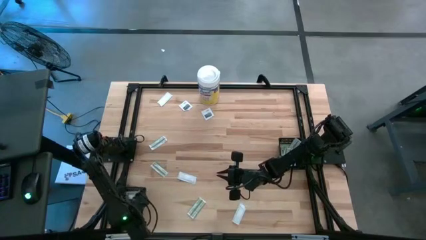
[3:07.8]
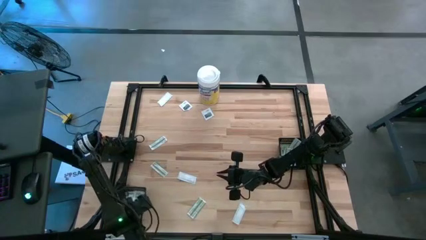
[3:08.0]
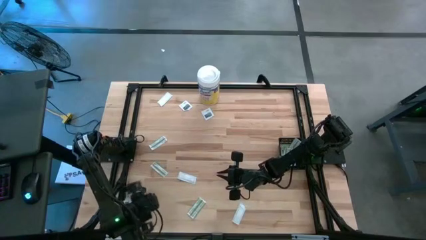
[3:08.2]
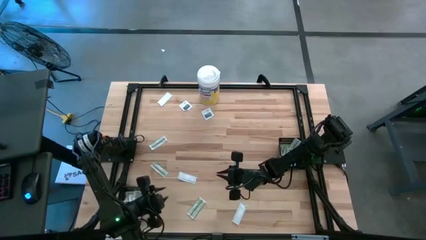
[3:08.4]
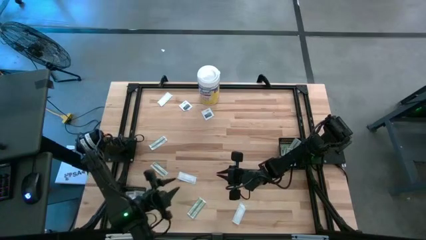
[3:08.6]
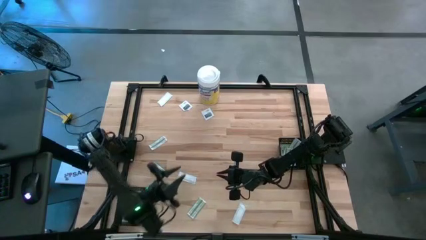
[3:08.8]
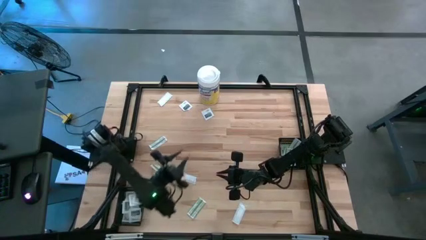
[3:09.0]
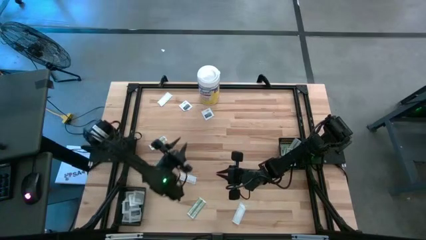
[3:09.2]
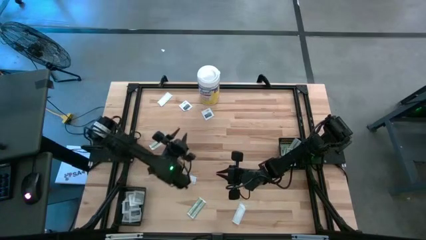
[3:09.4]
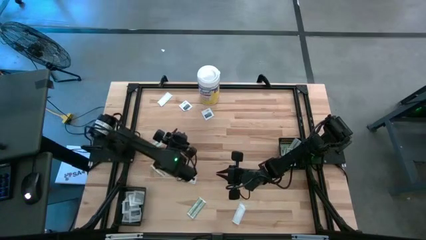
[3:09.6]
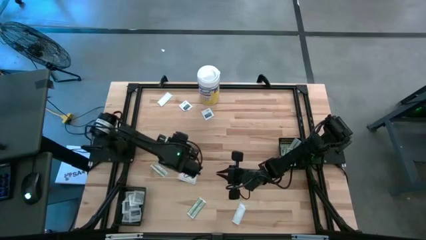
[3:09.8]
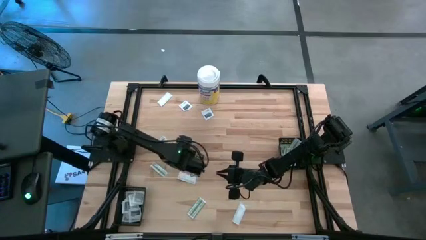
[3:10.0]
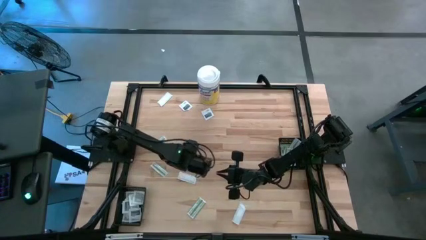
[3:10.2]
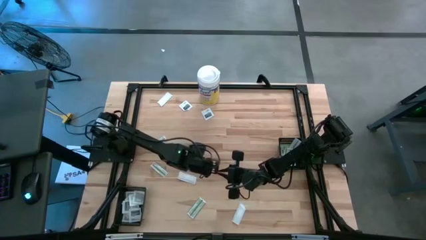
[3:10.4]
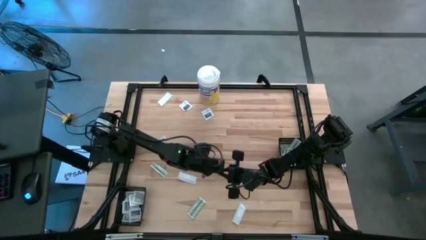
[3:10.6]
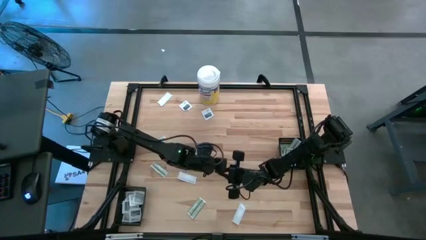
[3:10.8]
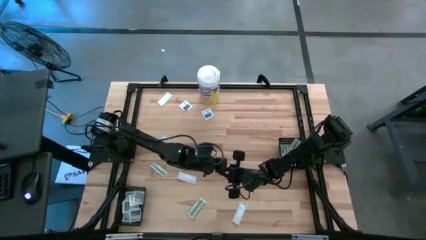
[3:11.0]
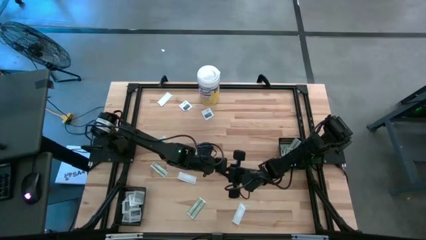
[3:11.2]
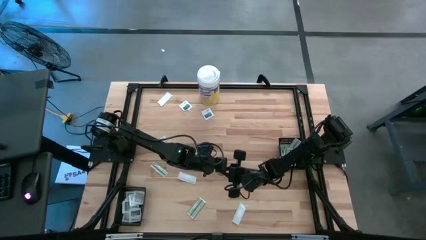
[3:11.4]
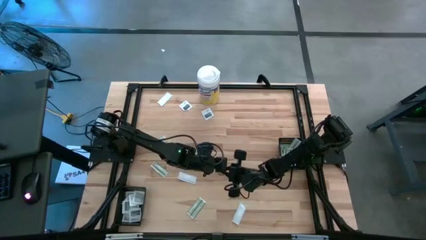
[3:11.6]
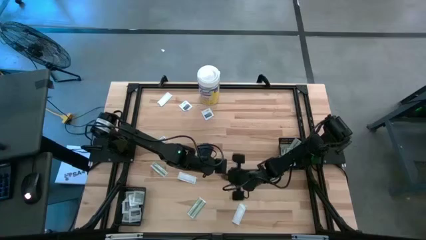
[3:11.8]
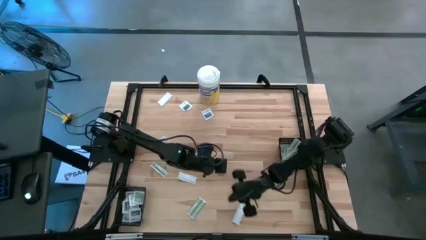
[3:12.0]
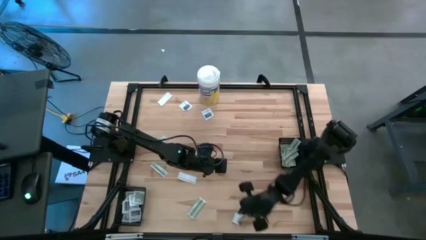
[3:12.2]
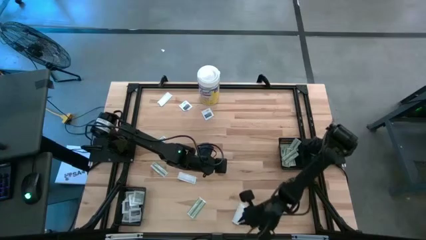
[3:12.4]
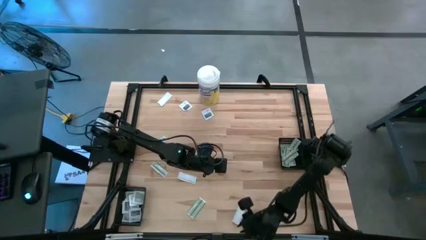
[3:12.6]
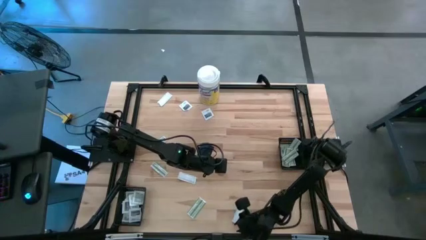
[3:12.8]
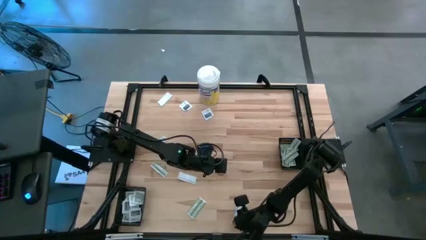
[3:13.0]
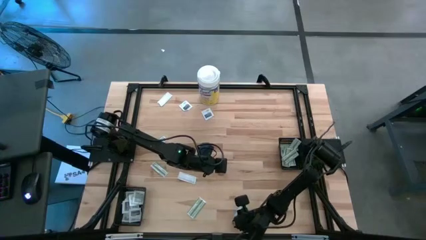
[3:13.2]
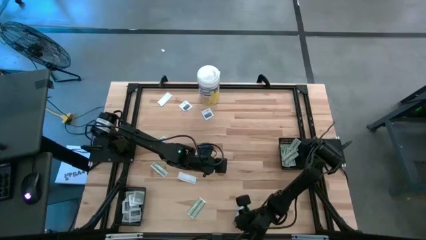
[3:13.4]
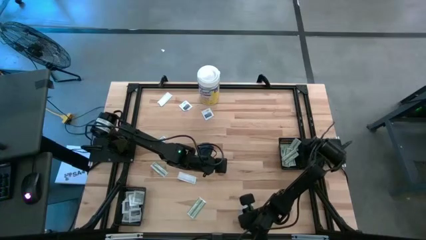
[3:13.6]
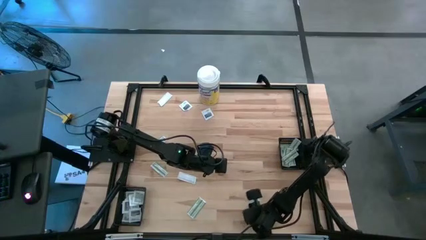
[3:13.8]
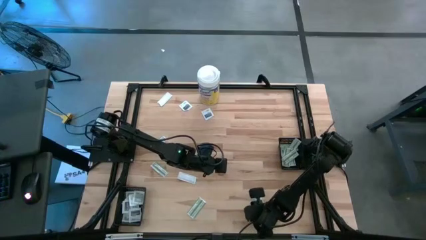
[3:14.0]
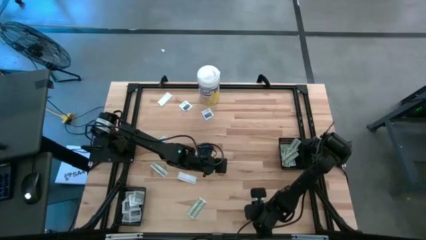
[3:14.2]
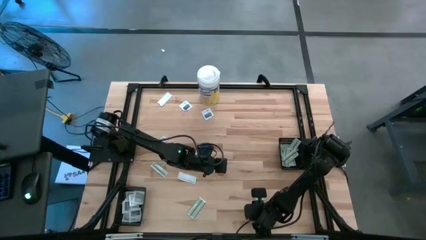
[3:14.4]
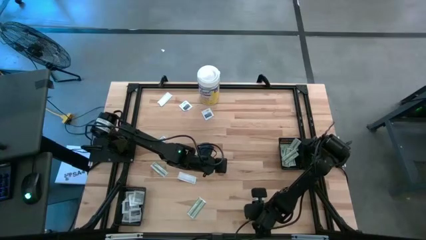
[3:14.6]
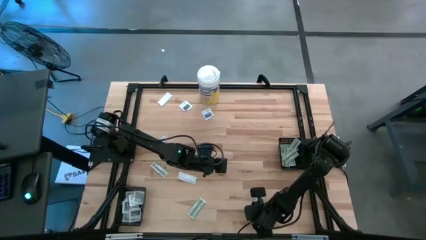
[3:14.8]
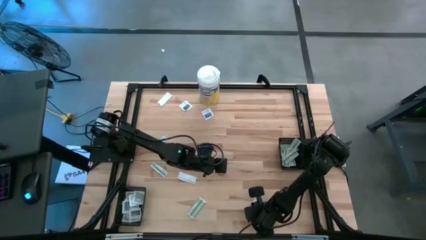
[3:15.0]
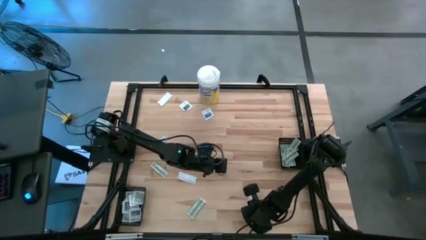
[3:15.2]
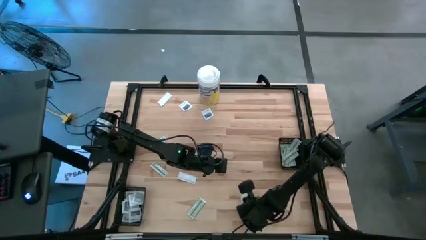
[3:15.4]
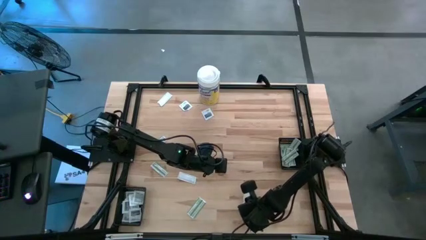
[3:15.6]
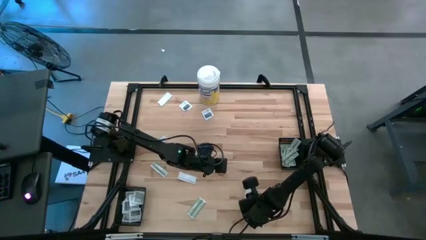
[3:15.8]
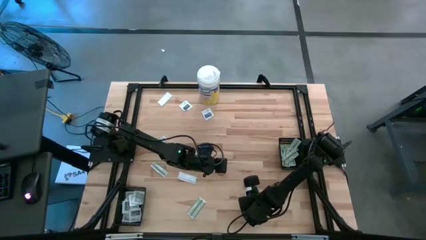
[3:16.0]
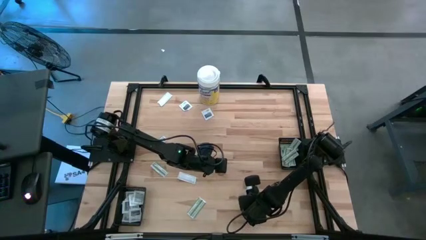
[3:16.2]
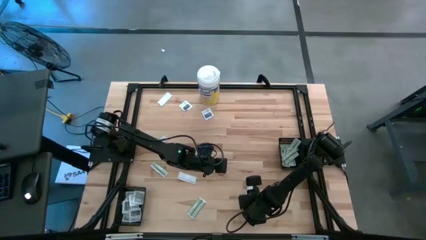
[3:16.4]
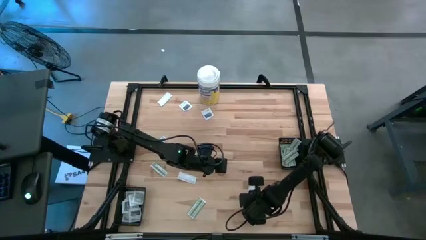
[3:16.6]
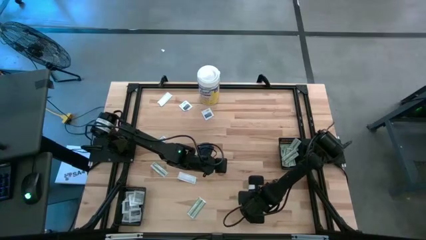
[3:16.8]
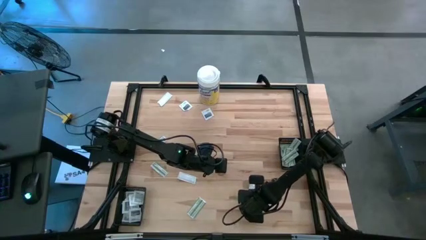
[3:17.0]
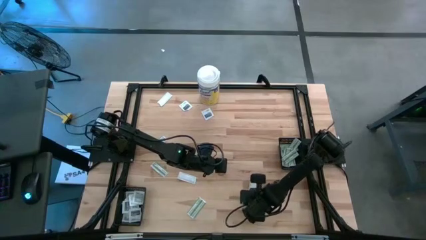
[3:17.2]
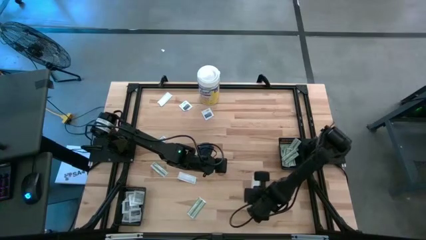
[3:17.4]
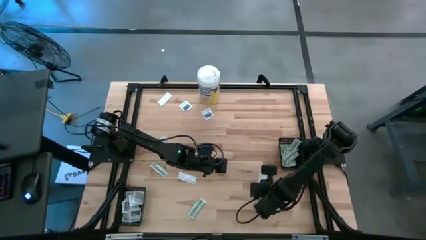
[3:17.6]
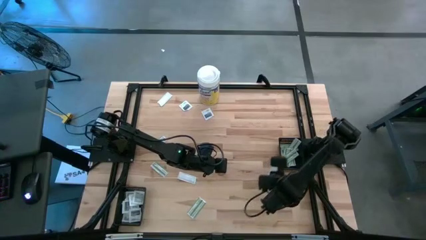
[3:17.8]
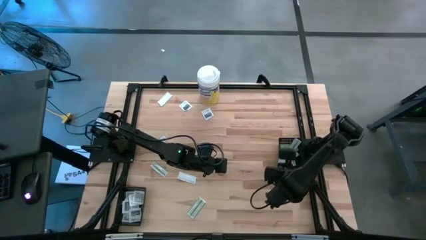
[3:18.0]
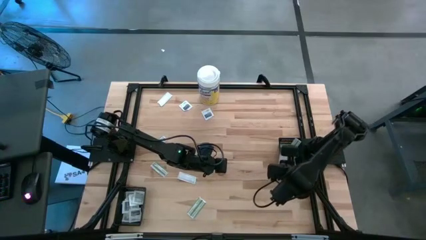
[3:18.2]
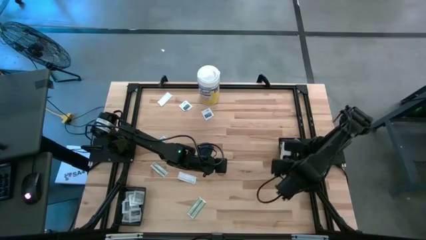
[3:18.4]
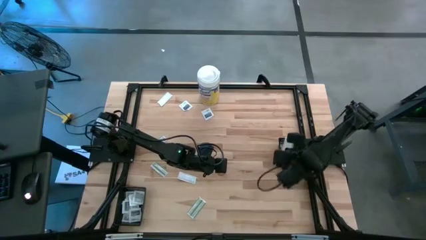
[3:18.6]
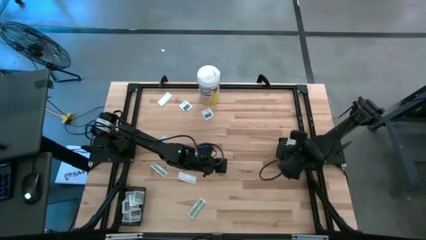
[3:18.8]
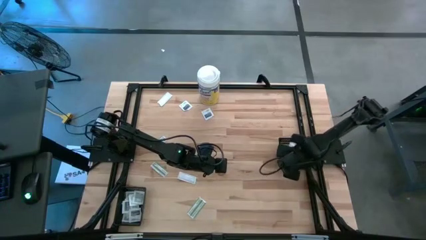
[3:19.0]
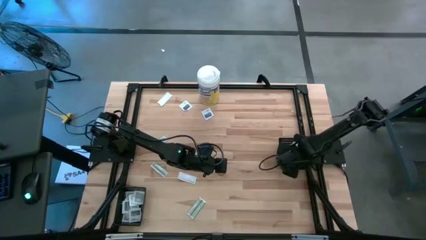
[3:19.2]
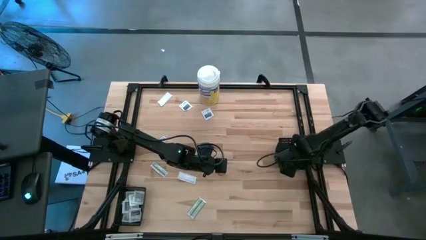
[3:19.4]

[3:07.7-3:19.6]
Task: Pick & Place First Aid Supplies
Put the white towelette sachet into the left black bin
